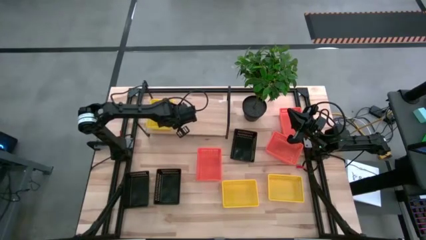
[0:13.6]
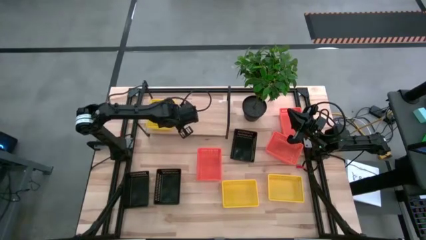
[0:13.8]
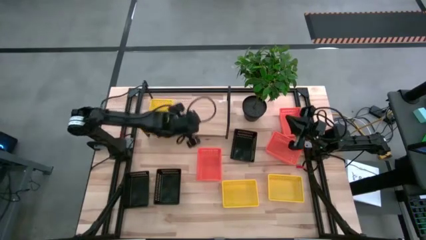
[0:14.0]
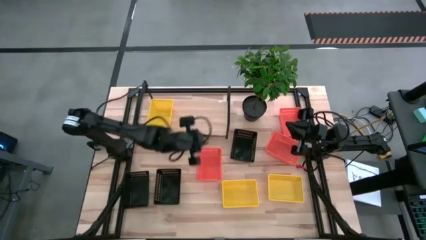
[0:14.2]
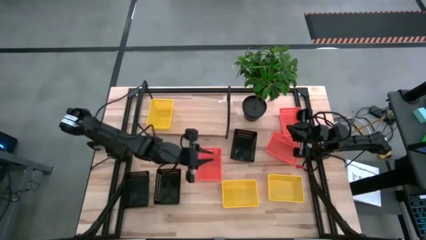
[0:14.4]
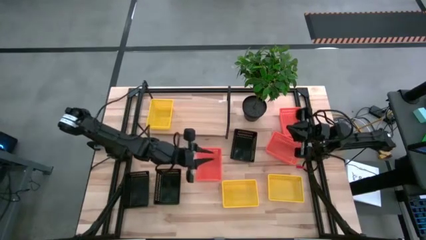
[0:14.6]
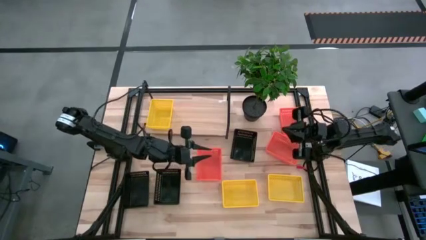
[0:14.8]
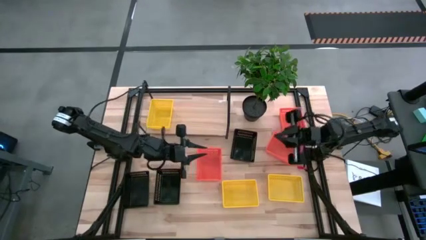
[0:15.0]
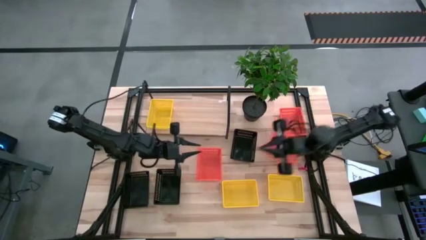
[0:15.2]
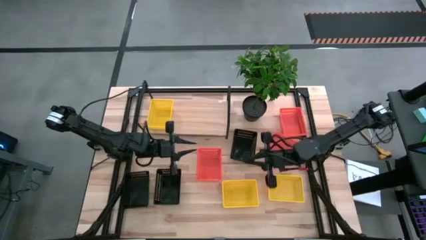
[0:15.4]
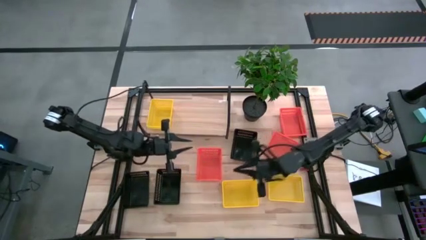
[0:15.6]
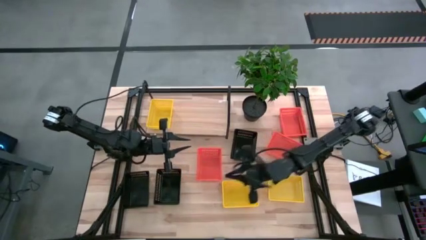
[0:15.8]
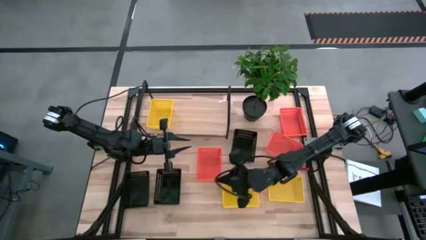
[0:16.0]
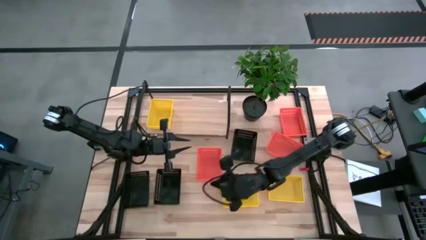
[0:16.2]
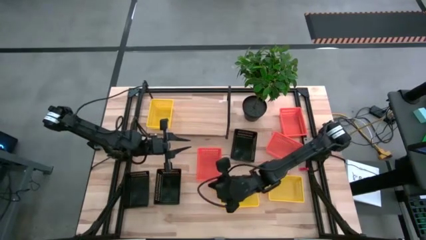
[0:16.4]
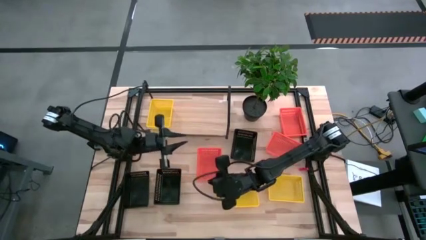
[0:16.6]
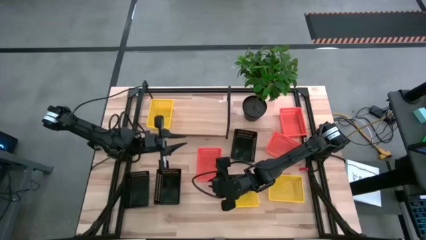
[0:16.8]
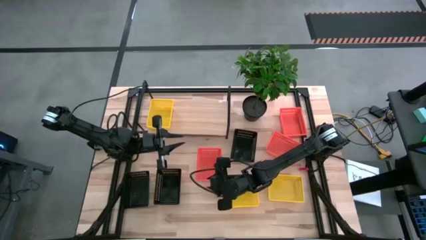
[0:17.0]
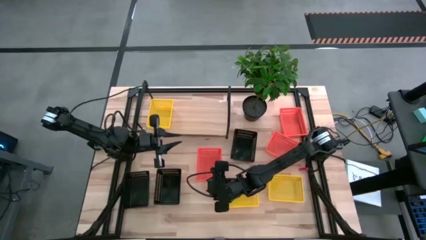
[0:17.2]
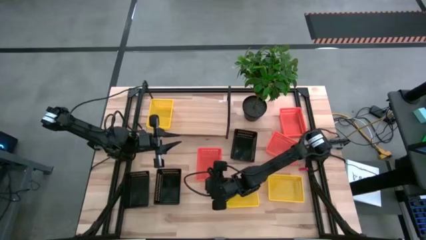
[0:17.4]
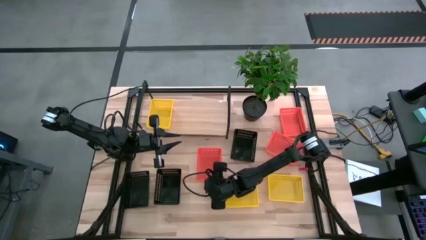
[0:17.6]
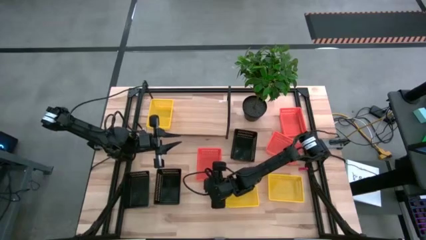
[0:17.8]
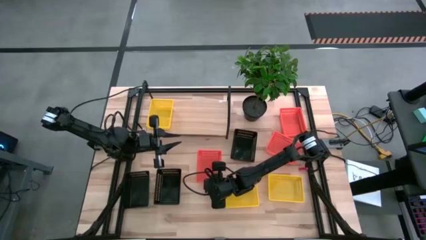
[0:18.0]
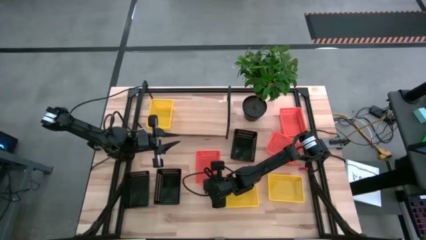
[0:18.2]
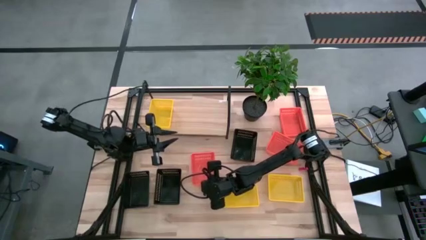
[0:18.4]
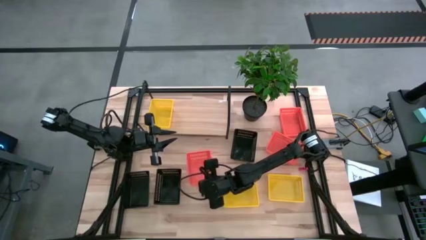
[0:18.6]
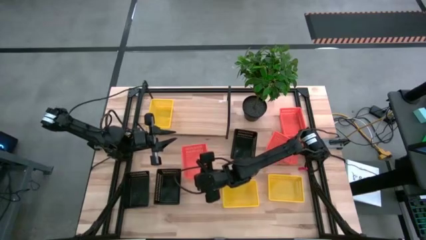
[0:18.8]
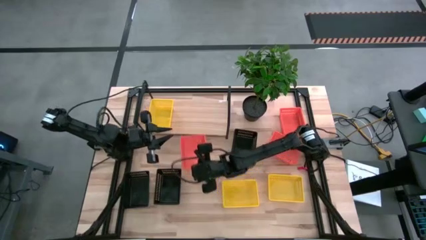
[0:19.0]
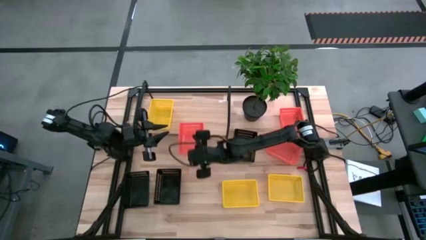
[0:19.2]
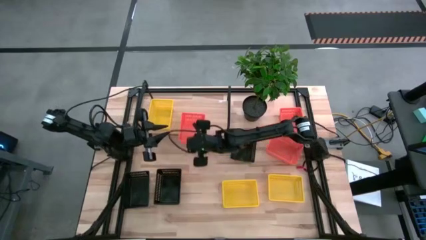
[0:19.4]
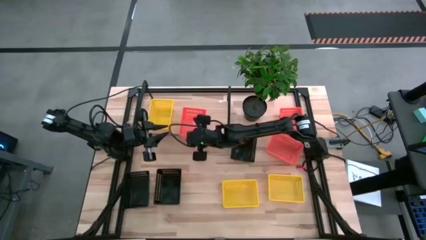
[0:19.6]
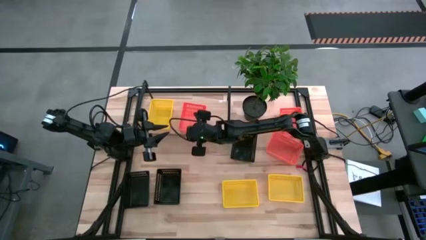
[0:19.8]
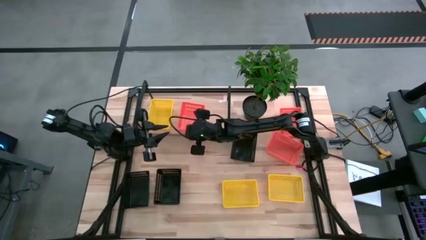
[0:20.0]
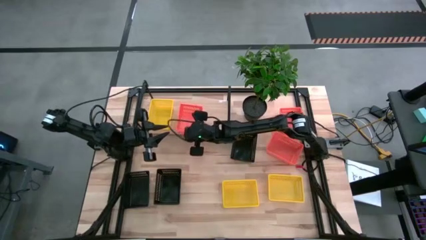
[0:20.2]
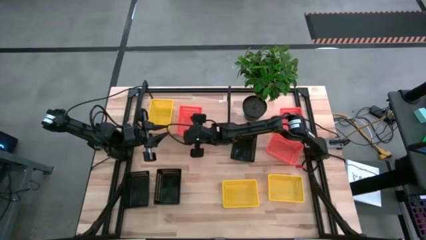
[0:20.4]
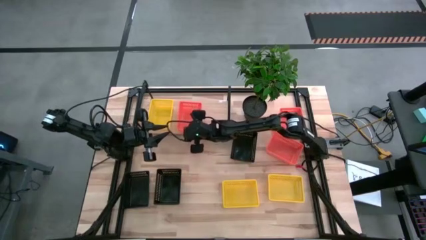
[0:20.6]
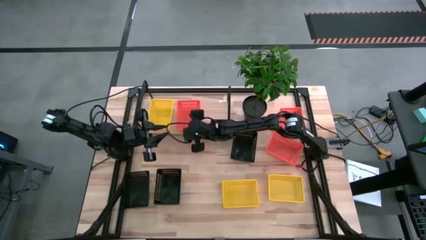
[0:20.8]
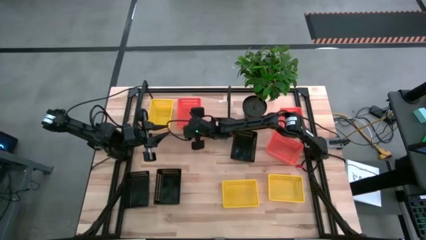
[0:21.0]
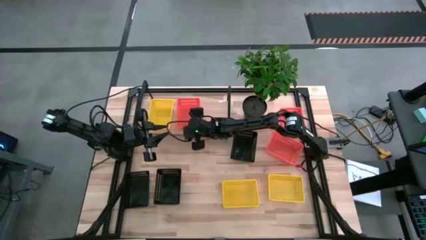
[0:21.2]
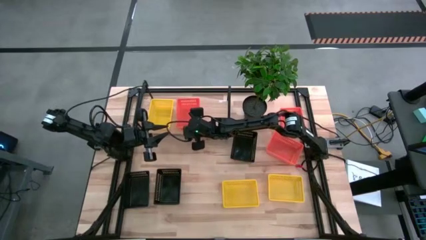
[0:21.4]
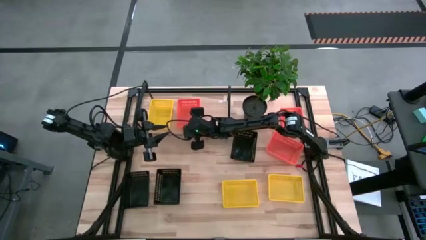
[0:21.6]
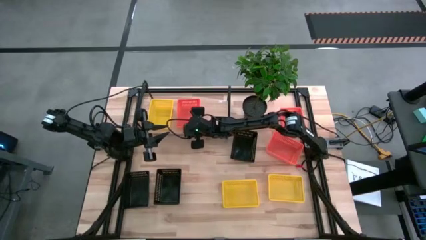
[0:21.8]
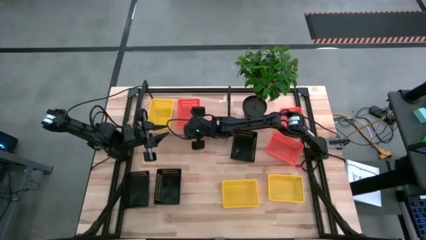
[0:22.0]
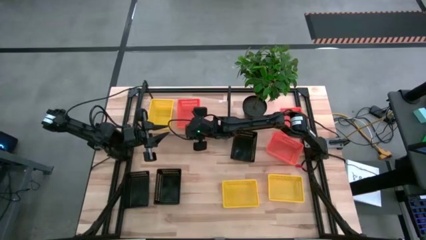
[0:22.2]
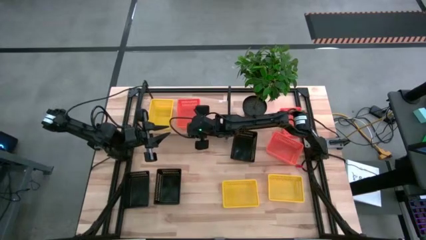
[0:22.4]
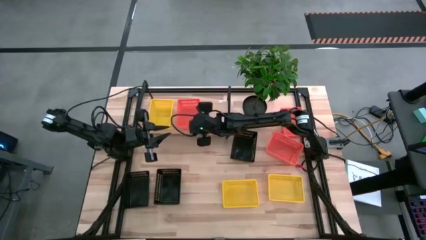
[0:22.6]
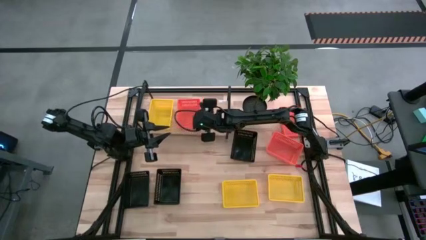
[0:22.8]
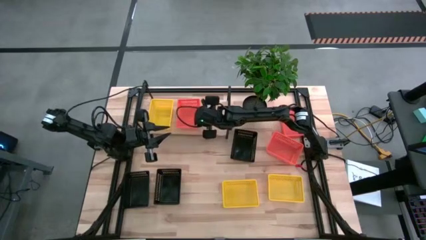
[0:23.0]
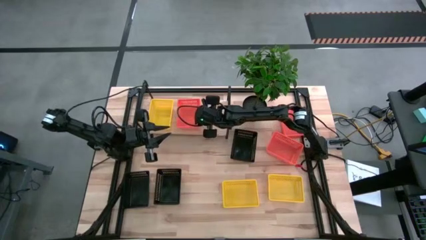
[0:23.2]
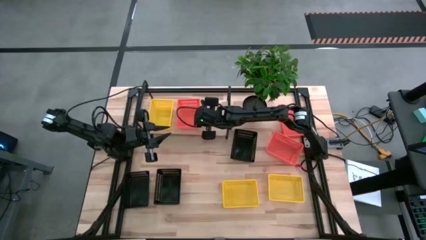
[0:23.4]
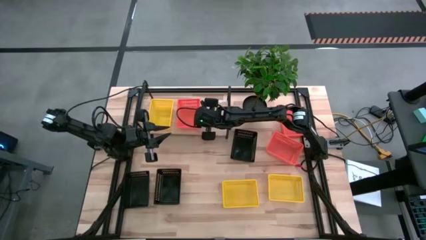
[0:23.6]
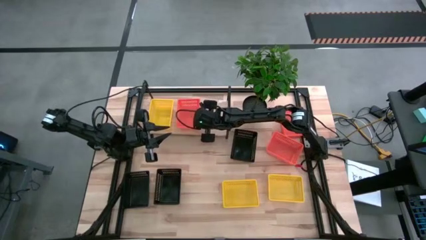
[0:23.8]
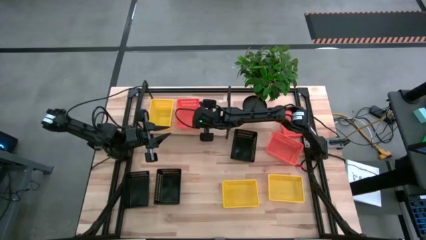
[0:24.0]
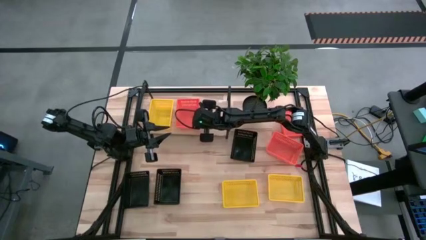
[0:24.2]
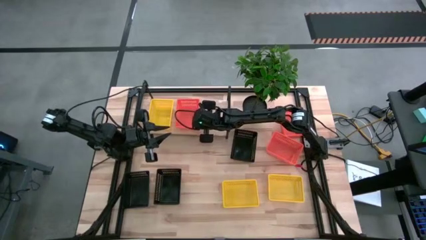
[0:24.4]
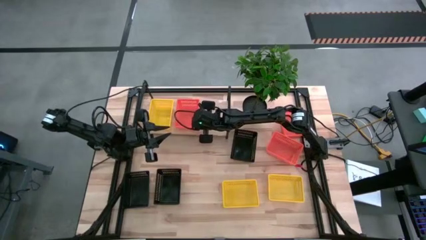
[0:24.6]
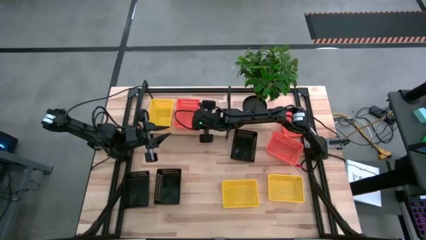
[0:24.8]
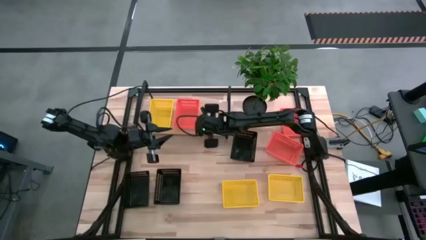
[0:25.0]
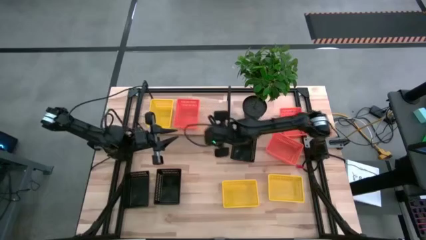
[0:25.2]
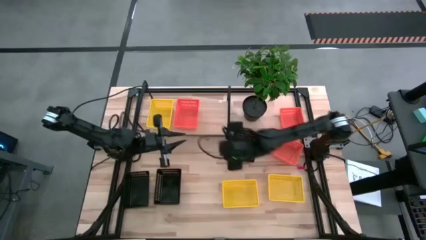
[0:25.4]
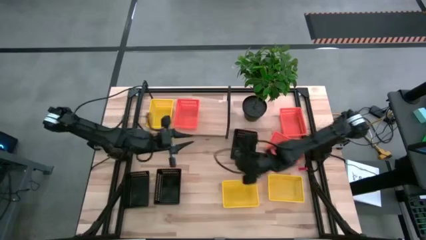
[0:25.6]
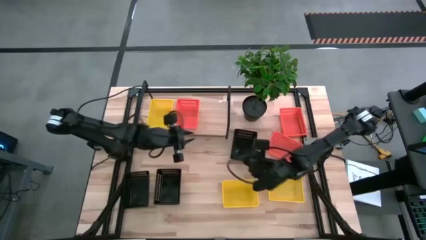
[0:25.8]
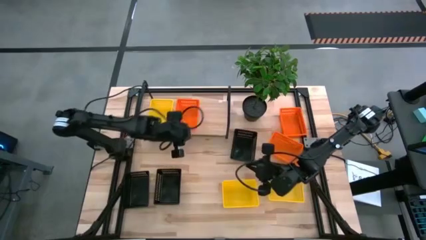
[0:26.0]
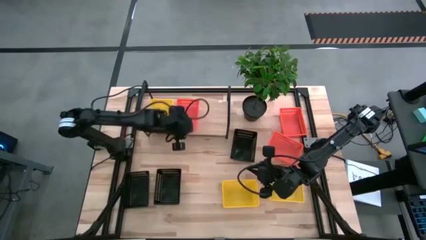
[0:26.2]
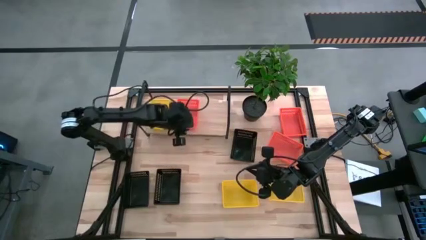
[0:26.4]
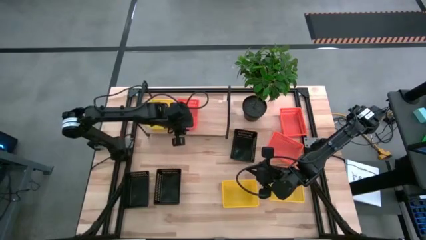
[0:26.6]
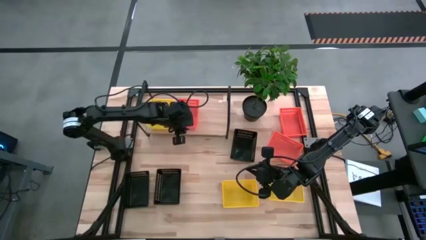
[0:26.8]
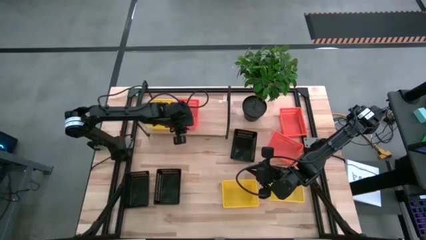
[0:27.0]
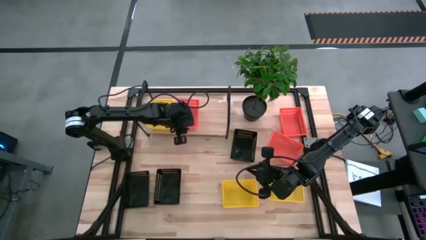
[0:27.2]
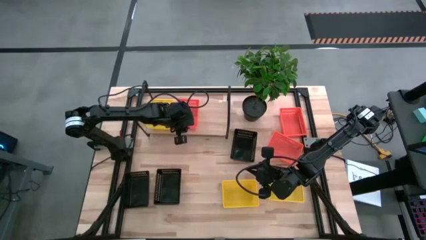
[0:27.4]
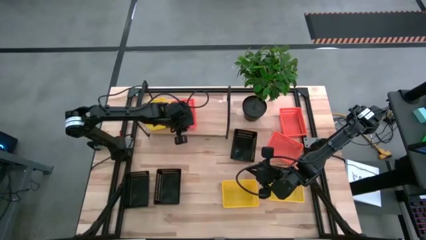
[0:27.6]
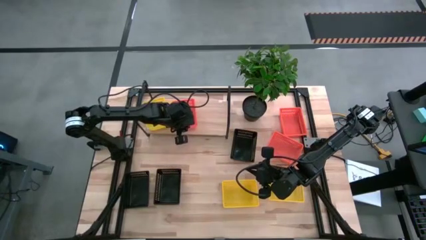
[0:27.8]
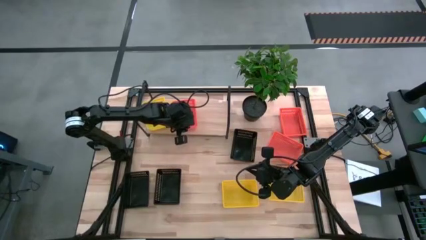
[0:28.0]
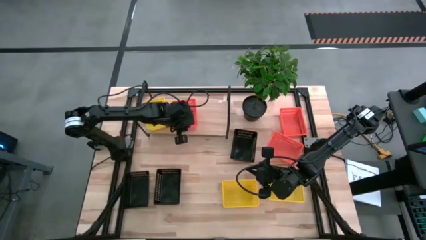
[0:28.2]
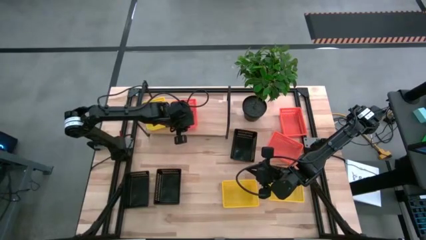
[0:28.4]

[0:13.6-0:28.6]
Task: Stack baskets on shelf by color
Put the left orange basket on the shelf
